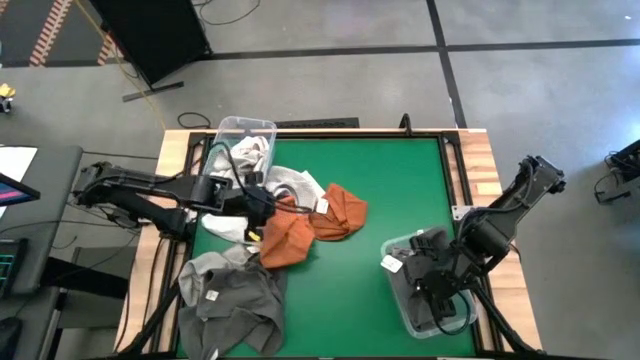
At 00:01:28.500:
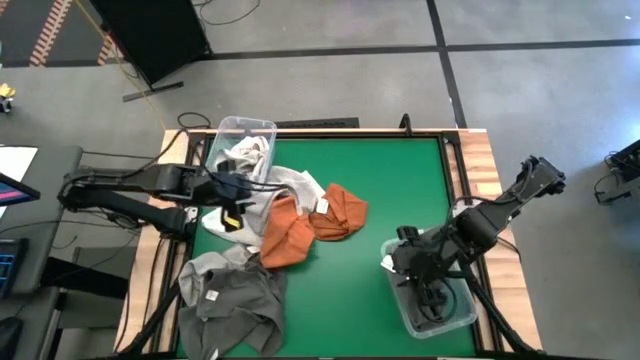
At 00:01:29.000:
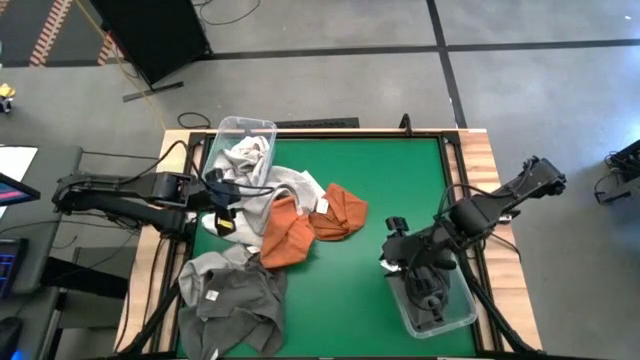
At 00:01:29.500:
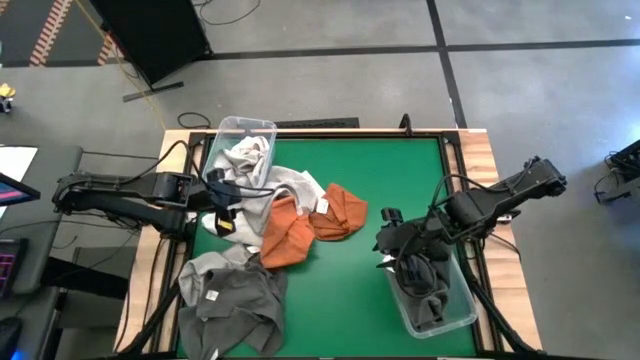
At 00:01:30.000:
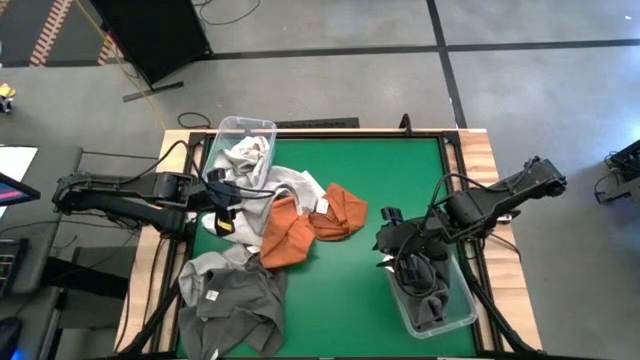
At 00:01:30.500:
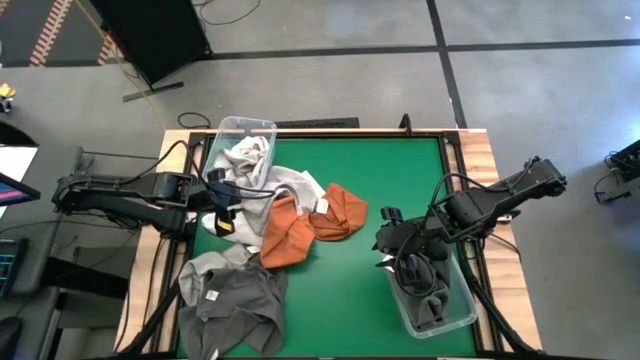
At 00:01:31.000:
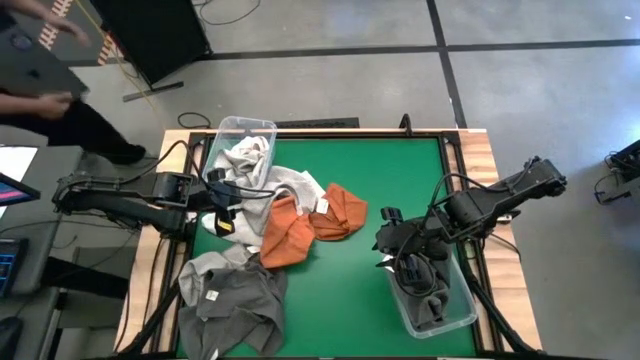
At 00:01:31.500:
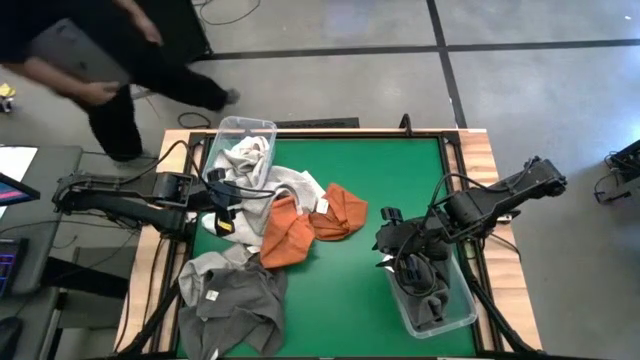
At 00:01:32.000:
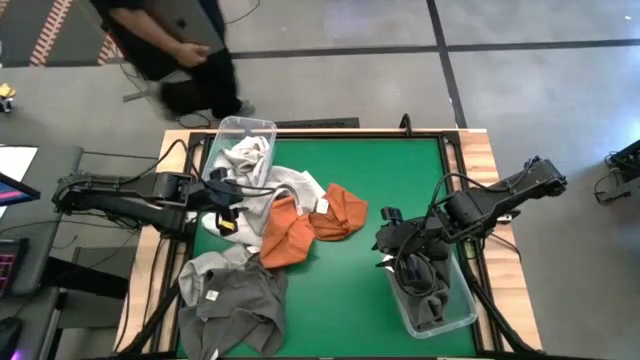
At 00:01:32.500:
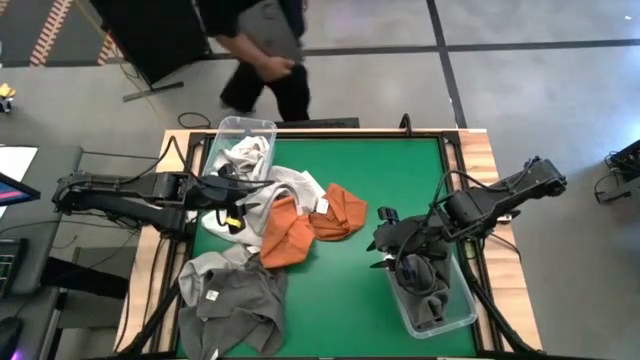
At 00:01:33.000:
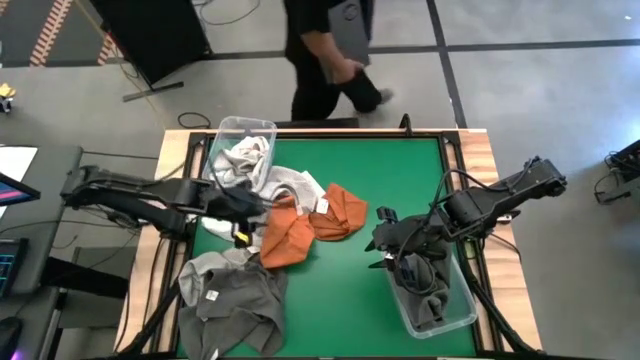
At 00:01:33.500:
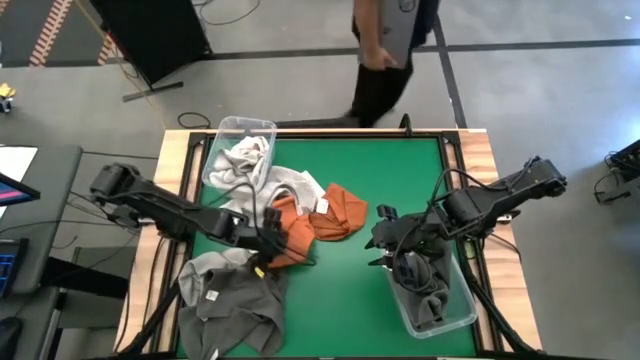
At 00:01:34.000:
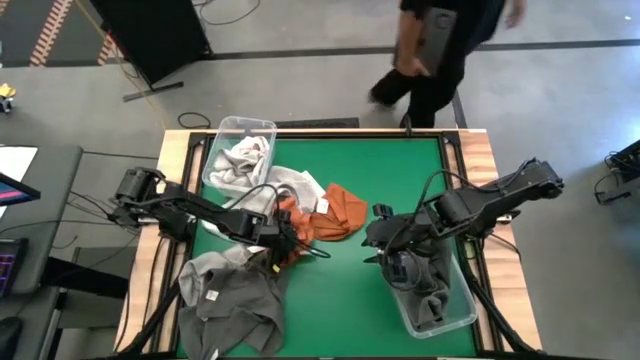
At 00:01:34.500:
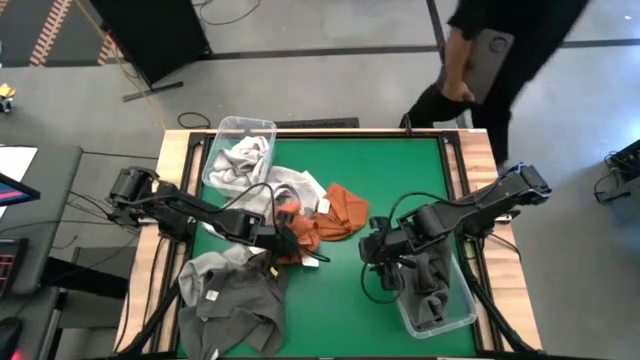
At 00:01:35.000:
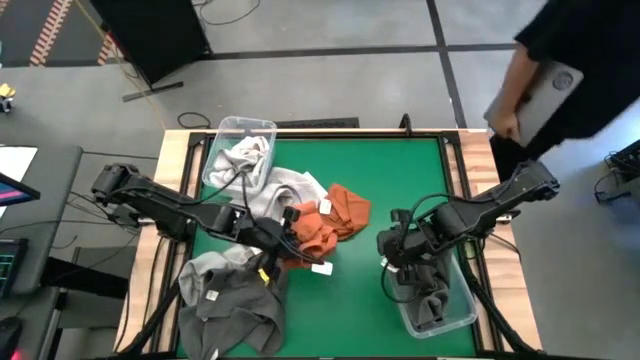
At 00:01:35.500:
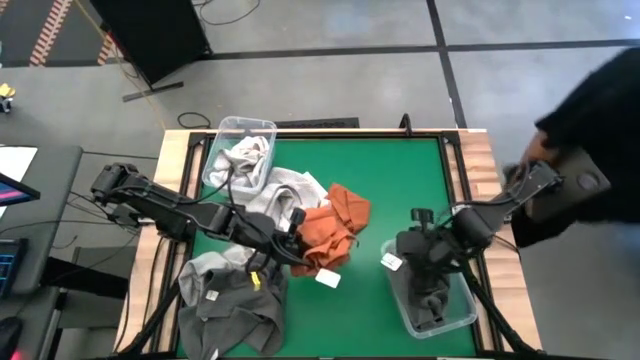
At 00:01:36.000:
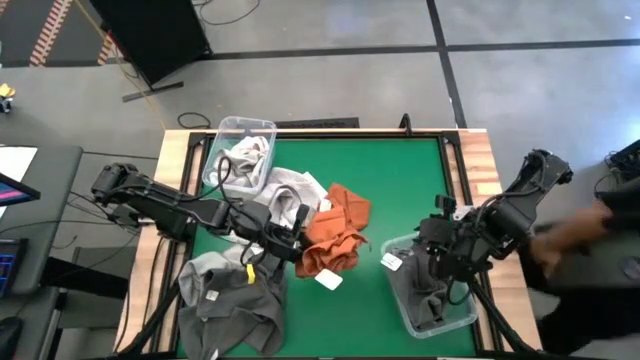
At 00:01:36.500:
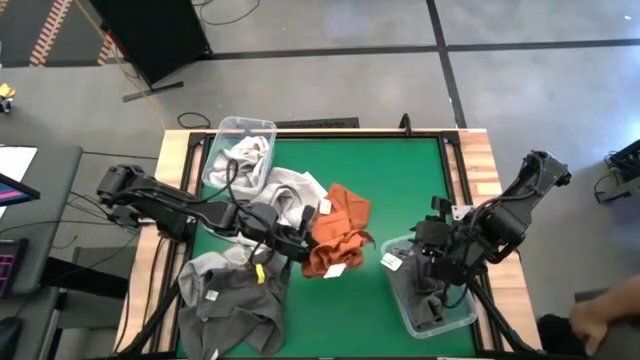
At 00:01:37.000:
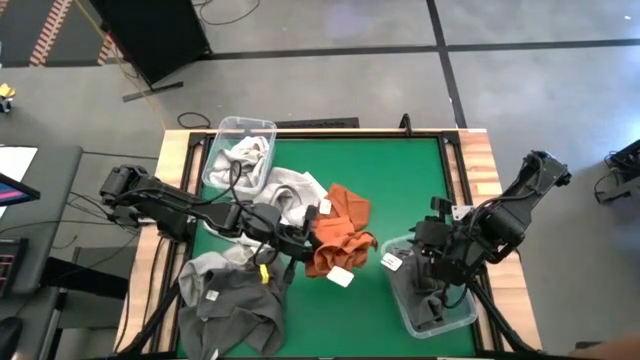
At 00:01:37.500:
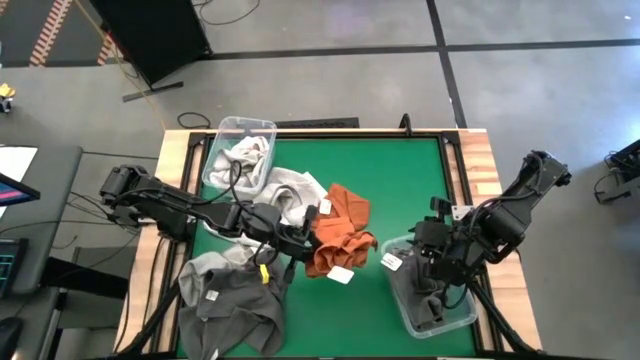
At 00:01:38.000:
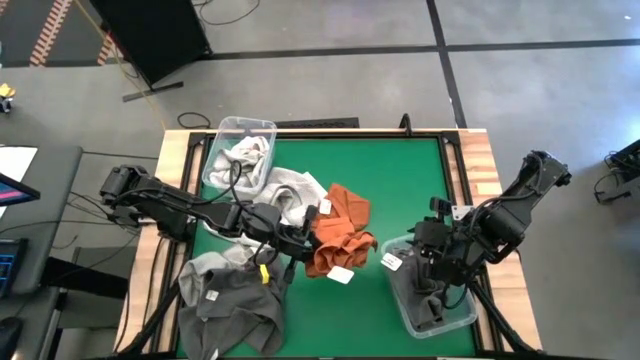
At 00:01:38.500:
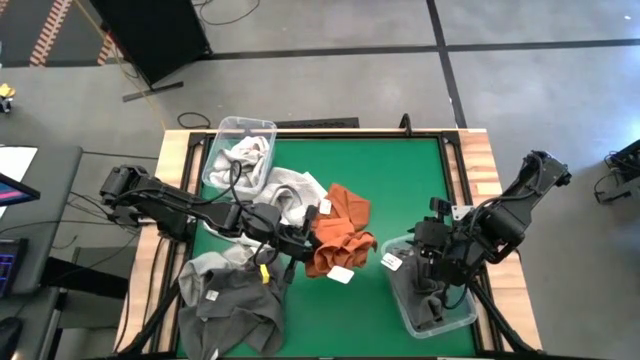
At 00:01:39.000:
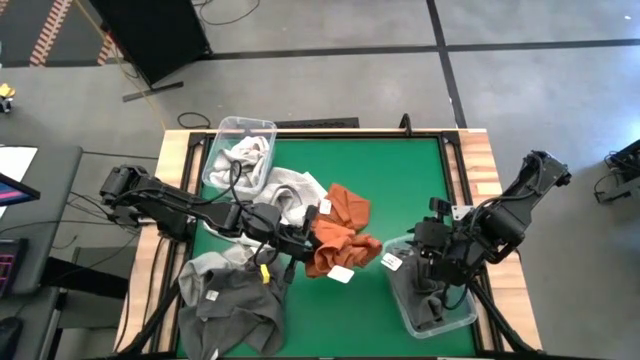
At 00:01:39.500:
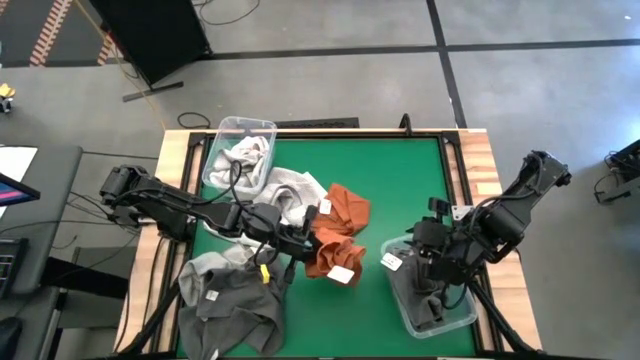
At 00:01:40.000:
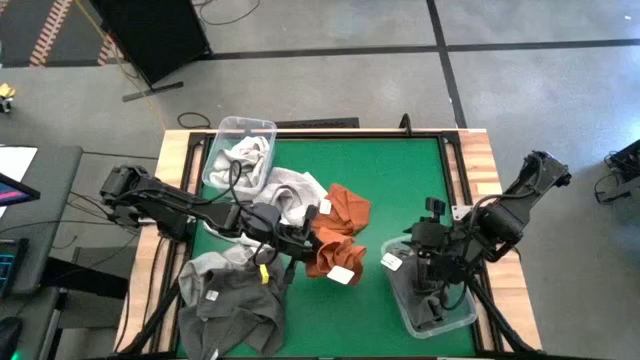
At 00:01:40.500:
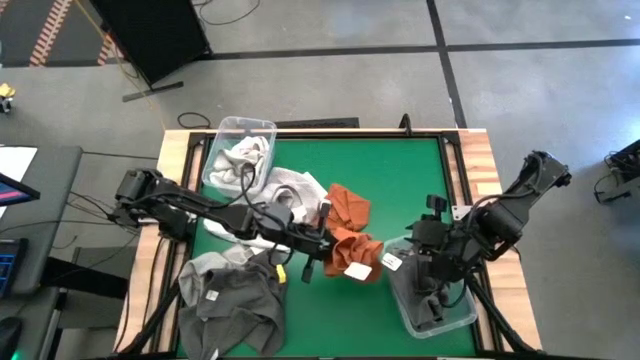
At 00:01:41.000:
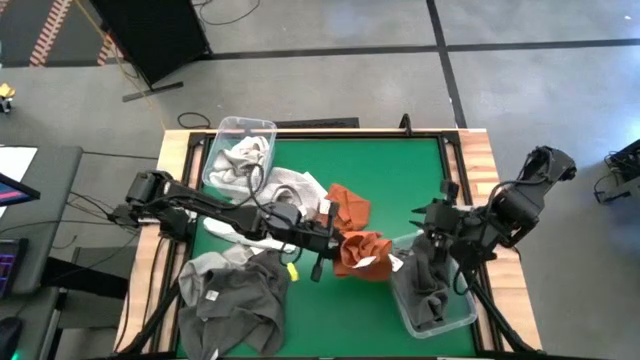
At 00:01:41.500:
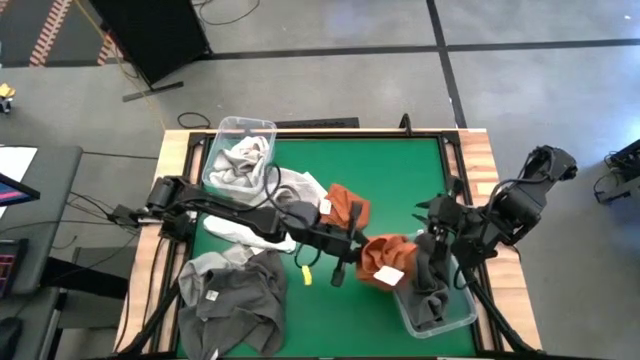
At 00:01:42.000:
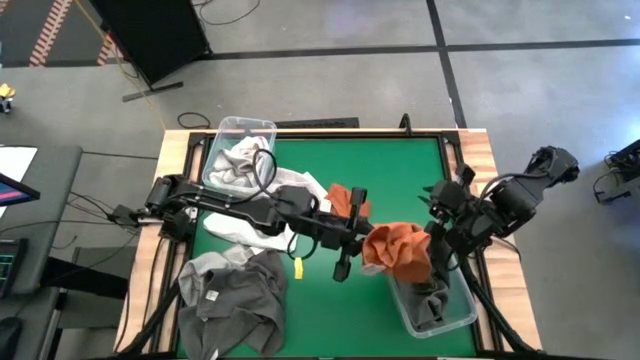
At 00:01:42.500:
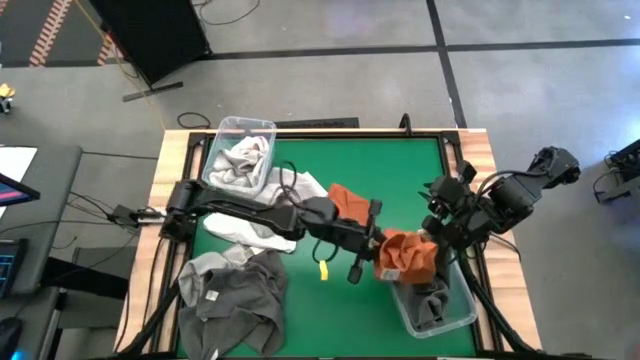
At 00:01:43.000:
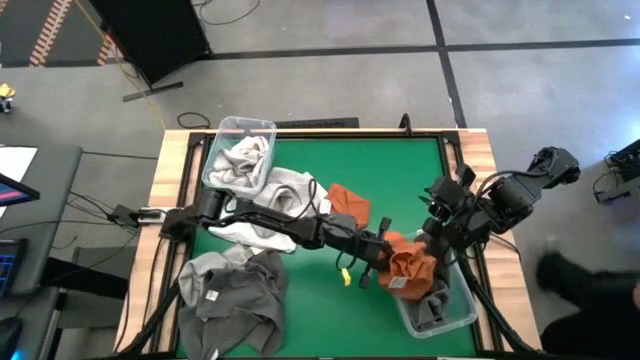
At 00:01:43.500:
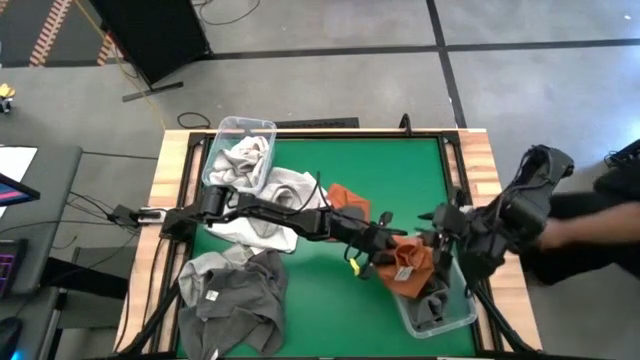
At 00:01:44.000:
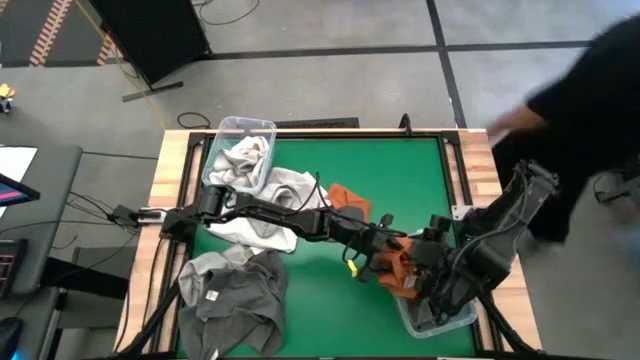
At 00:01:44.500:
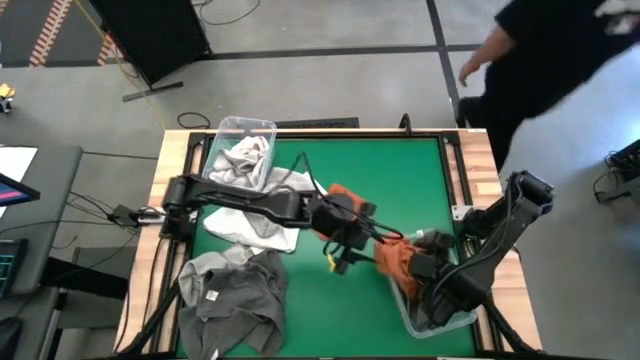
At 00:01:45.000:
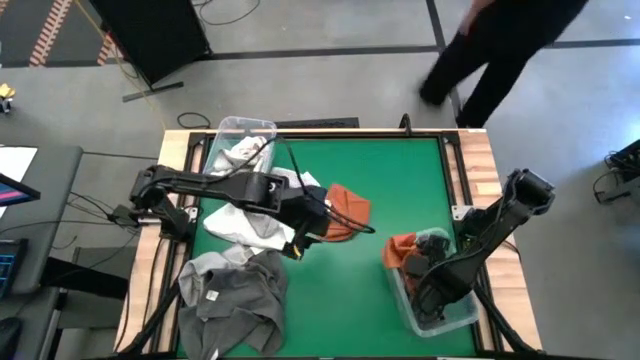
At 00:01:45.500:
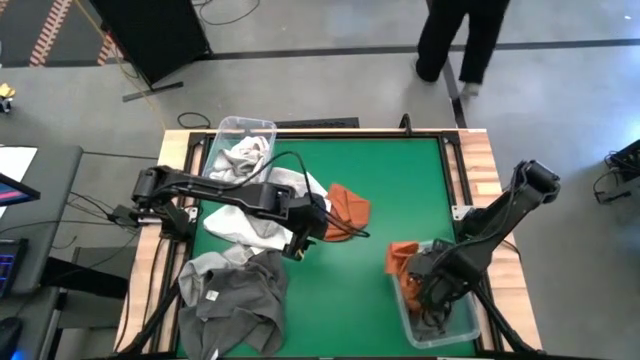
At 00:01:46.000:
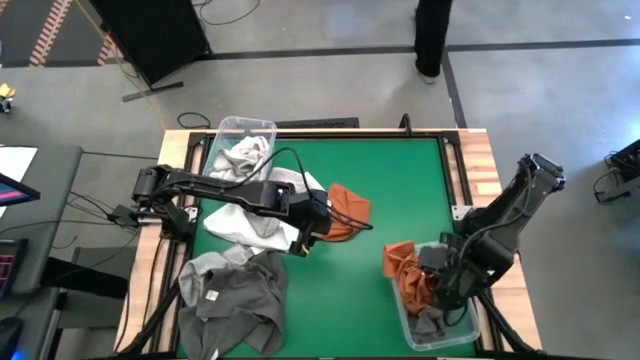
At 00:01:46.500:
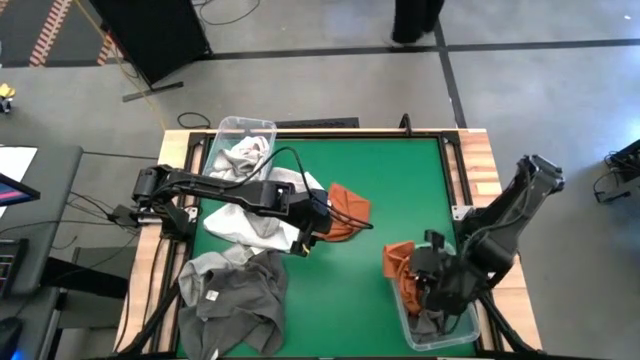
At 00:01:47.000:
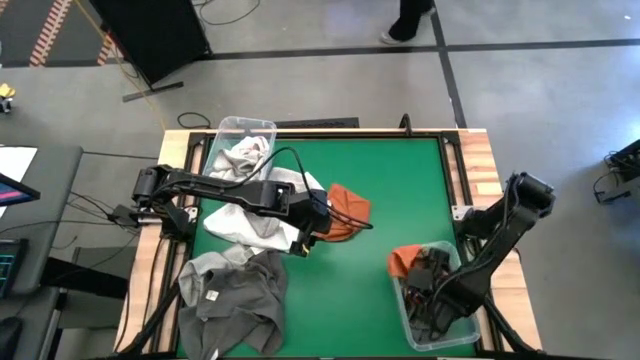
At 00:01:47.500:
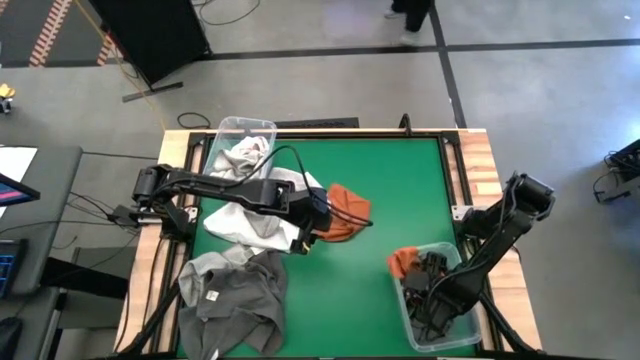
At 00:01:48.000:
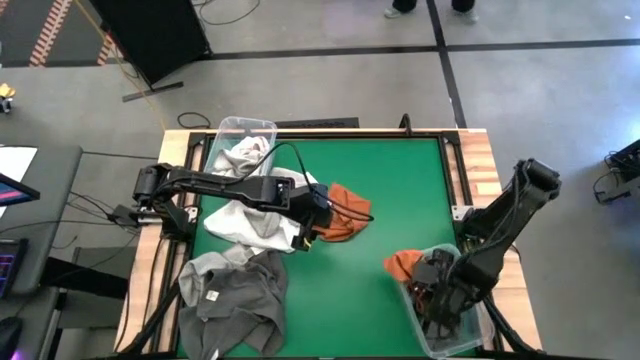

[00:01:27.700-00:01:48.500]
Task: Sort towels by color in basket
Put the left orange towel into the bottom transparent bin

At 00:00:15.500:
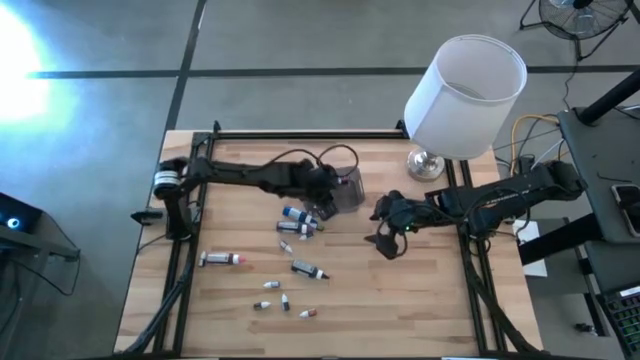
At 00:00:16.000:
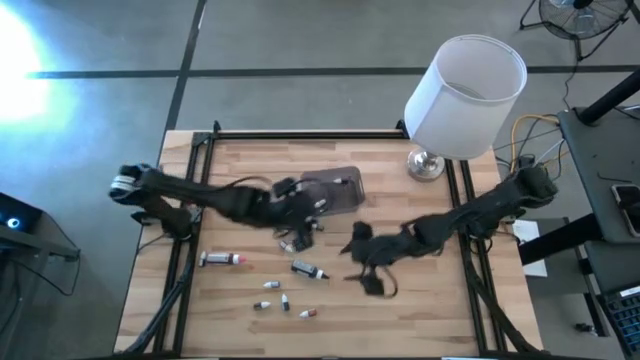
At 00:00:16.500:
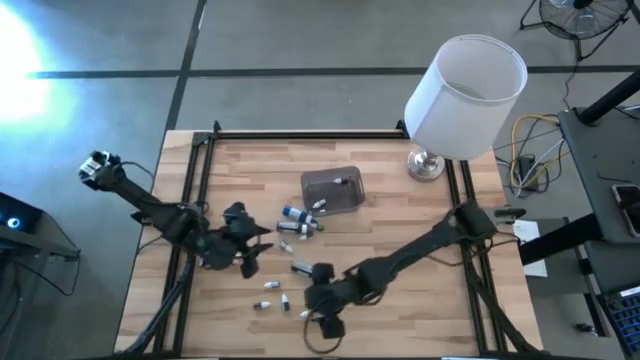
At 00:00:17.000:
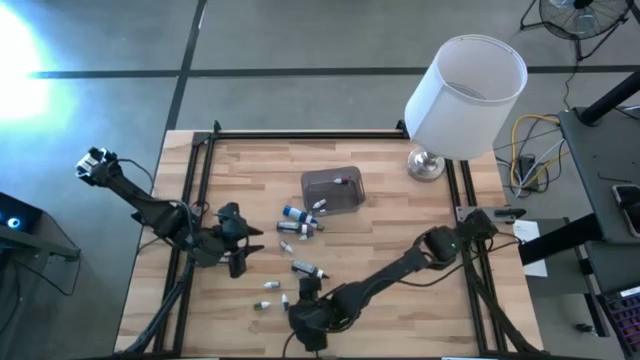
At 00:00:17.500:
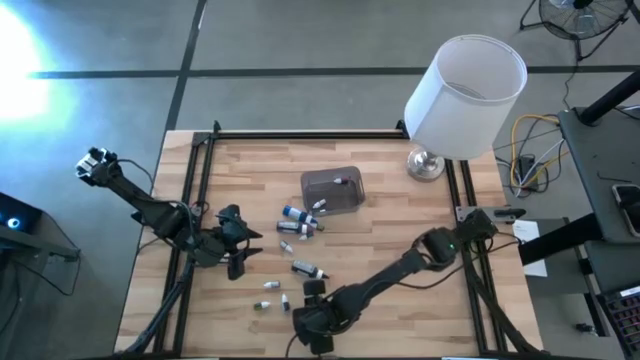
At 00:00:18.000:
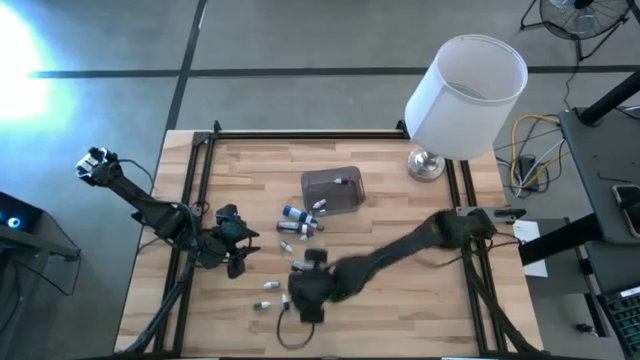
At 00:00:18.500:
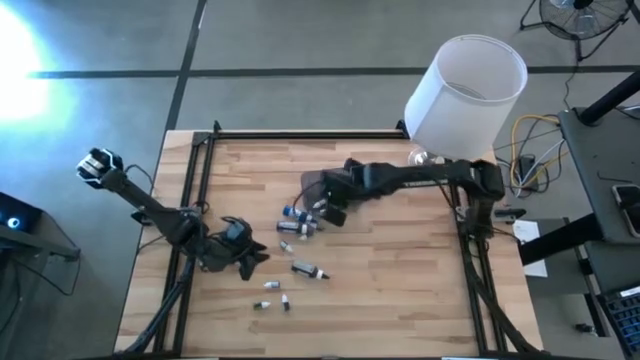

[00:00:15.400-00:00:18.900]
Task: Pick & Place food coloring
Put the small orange food coloring bottle into the bin
